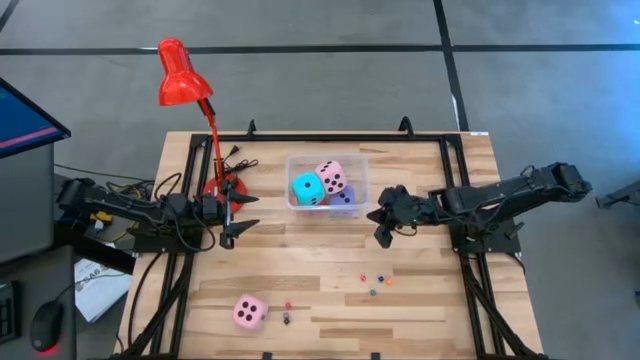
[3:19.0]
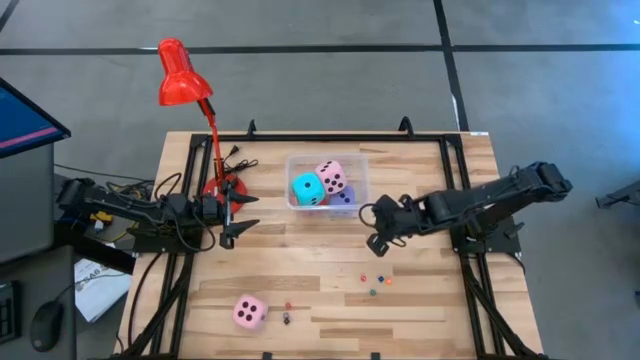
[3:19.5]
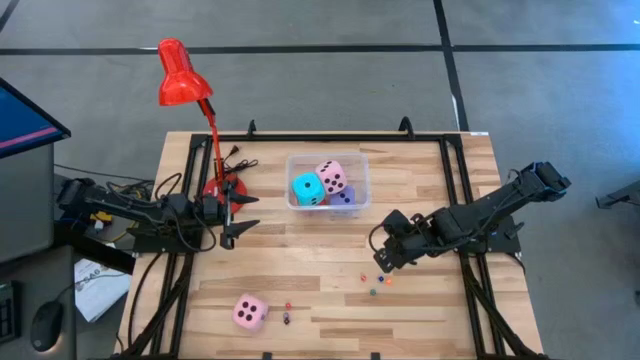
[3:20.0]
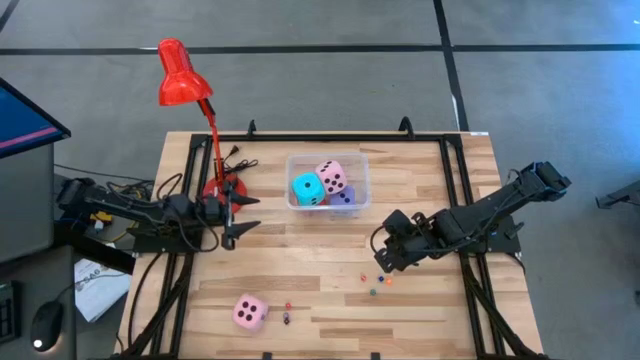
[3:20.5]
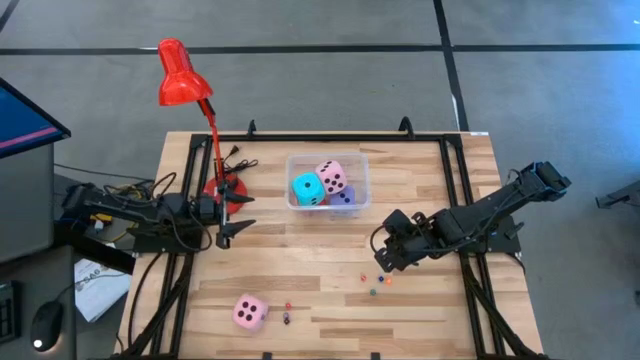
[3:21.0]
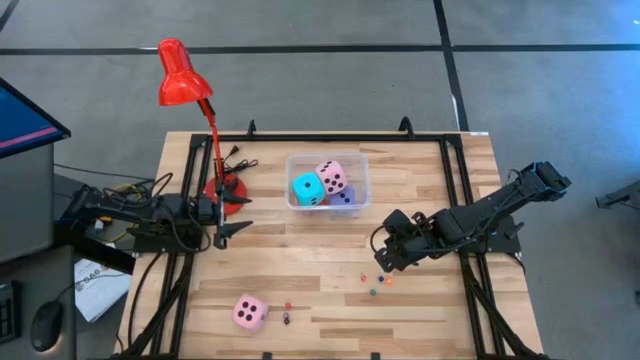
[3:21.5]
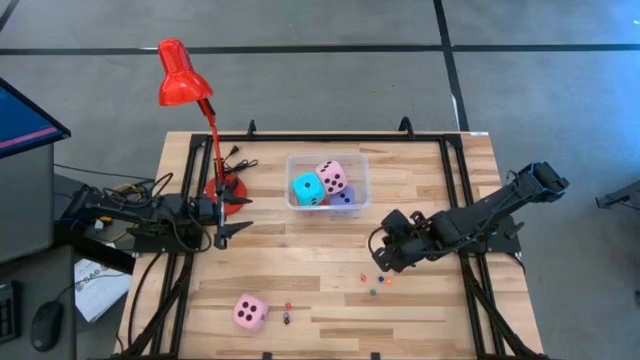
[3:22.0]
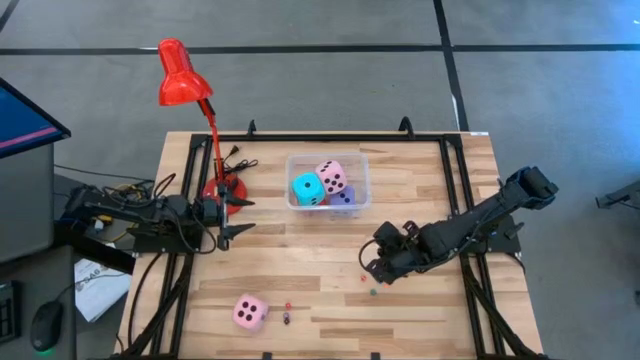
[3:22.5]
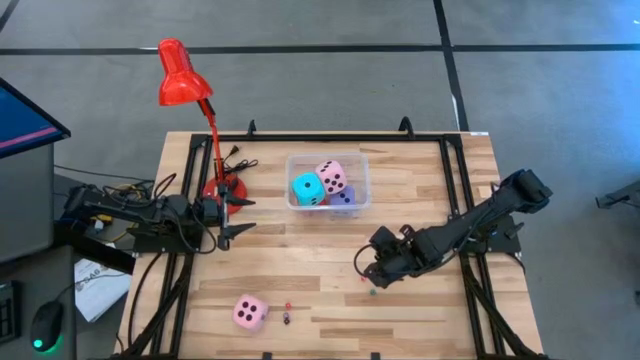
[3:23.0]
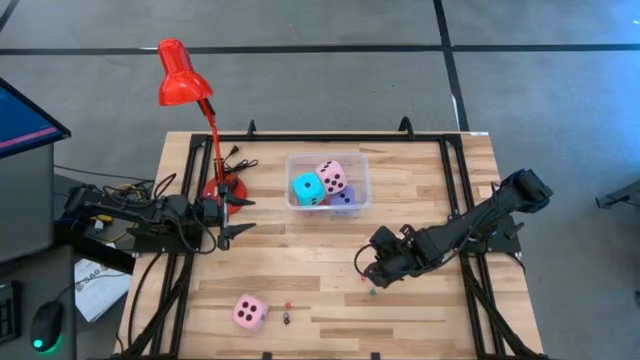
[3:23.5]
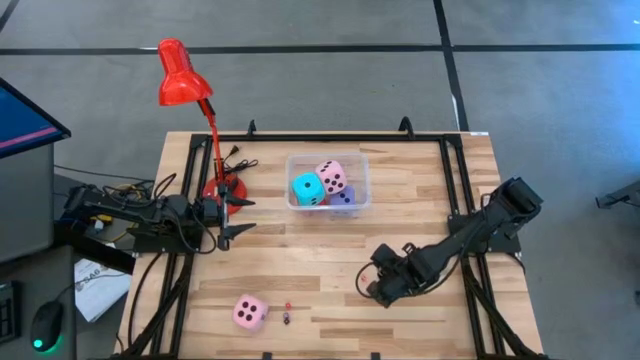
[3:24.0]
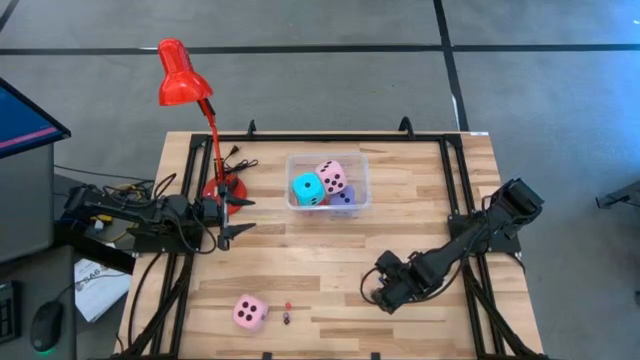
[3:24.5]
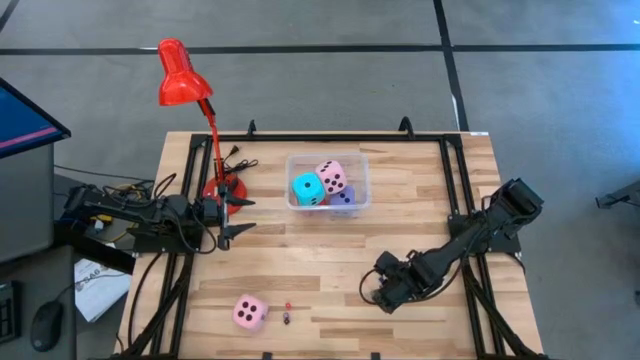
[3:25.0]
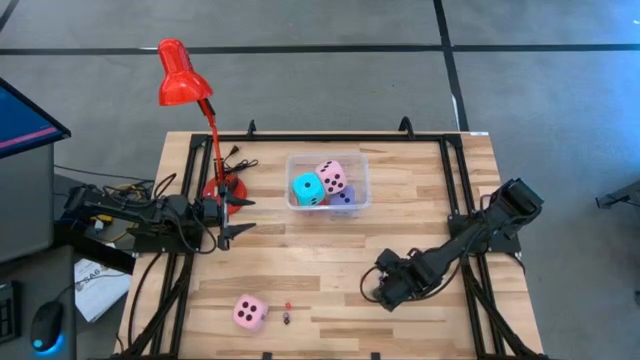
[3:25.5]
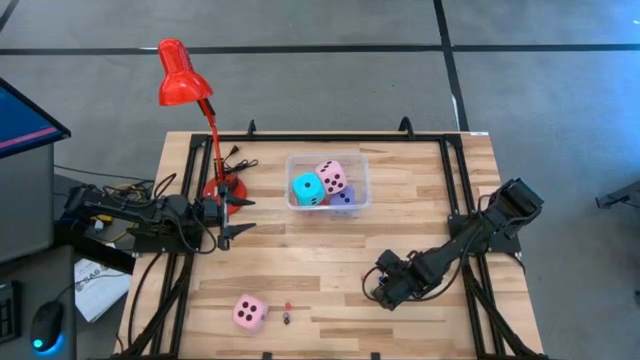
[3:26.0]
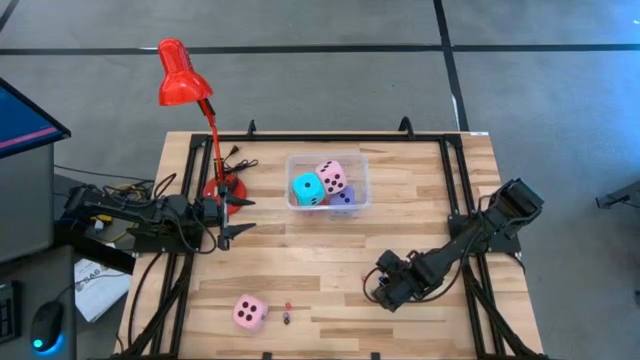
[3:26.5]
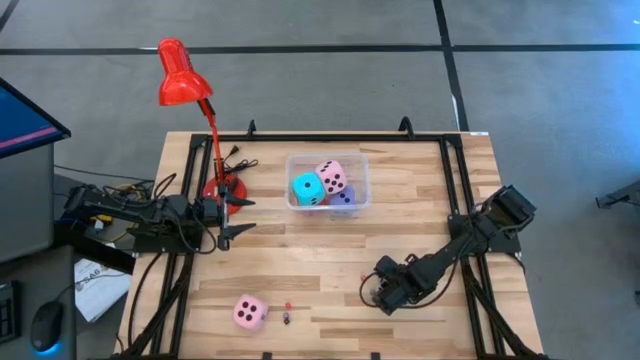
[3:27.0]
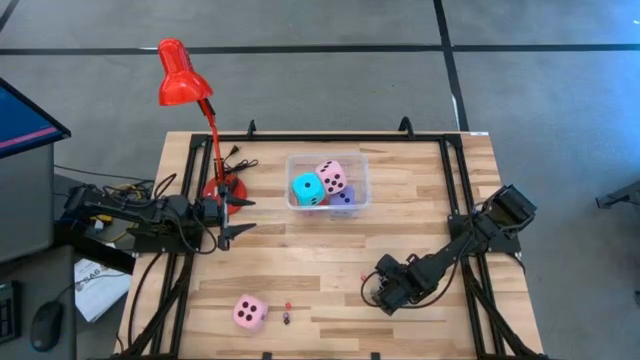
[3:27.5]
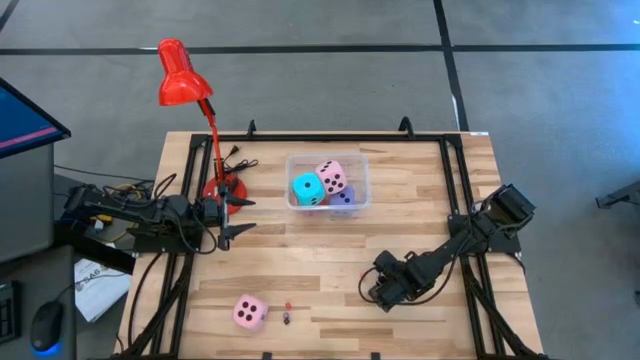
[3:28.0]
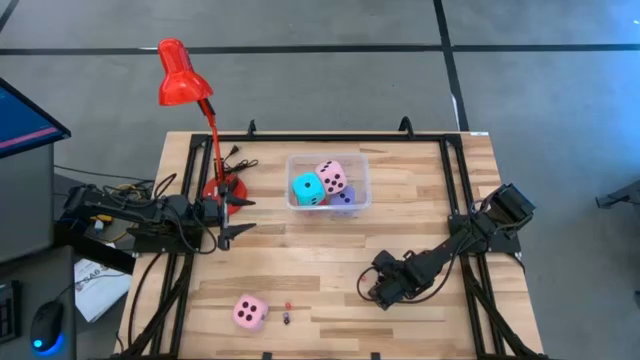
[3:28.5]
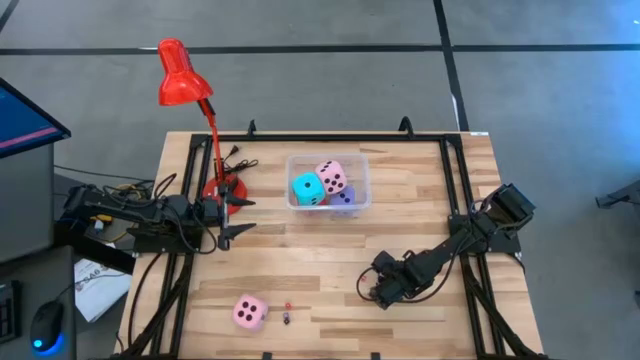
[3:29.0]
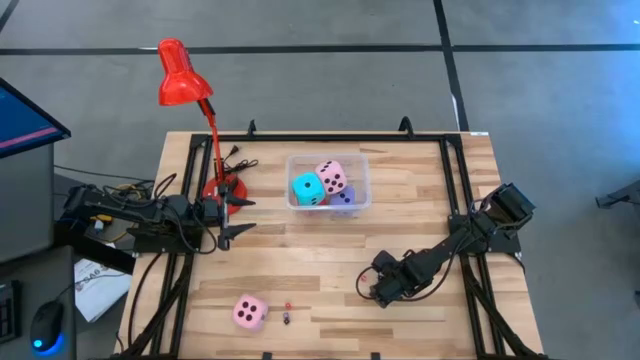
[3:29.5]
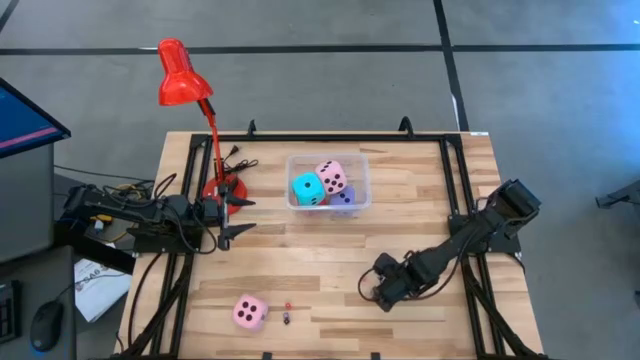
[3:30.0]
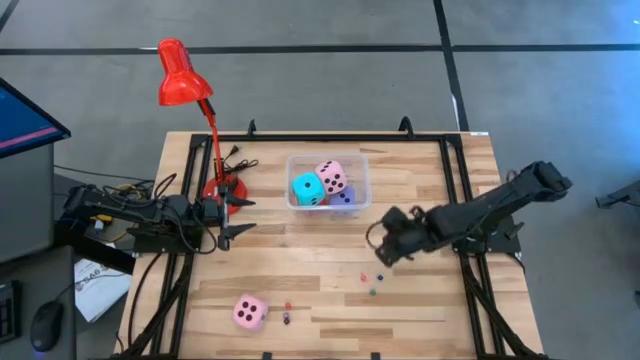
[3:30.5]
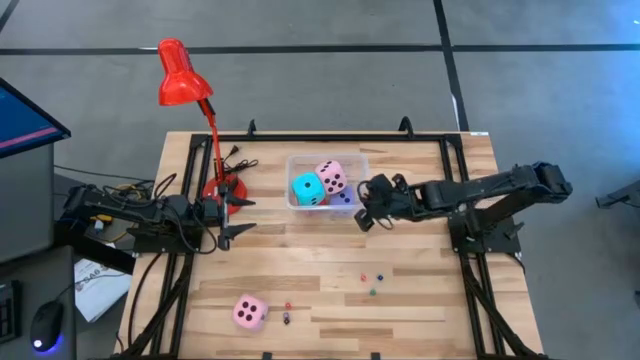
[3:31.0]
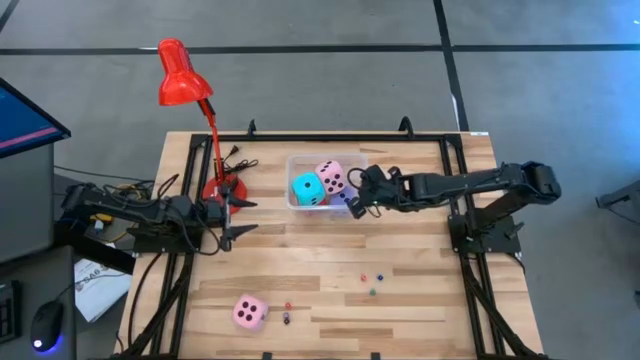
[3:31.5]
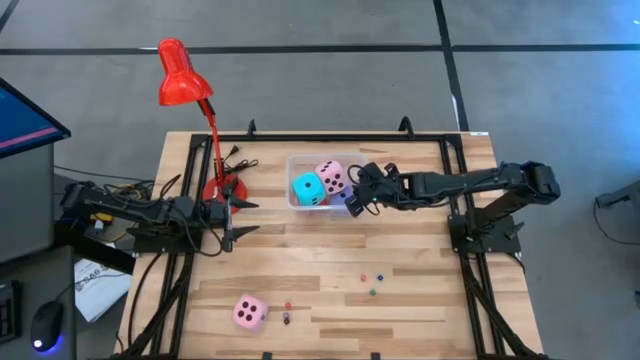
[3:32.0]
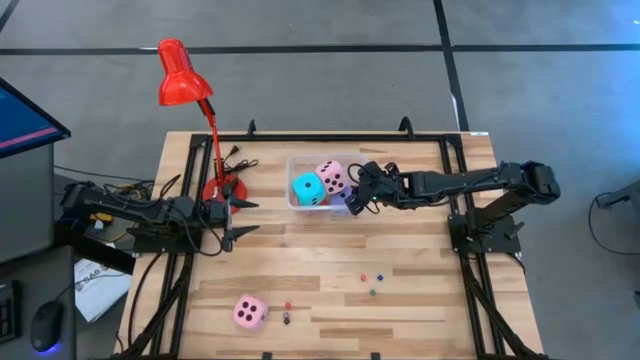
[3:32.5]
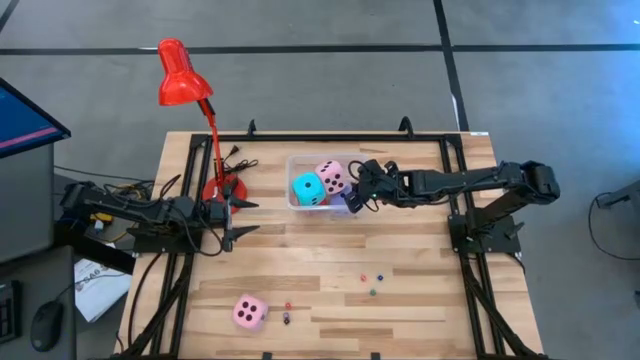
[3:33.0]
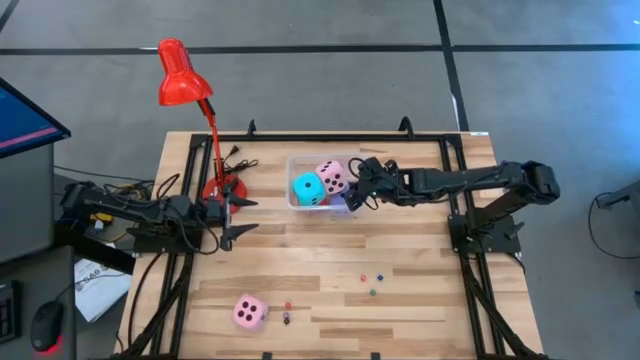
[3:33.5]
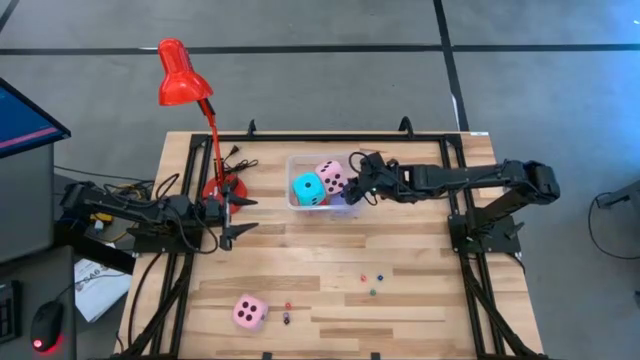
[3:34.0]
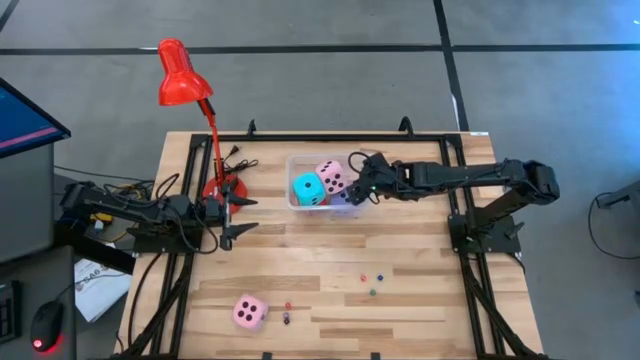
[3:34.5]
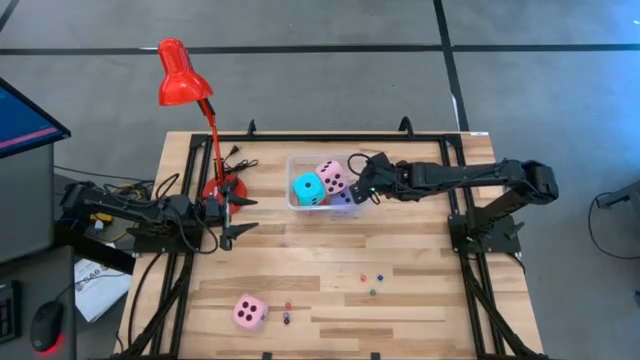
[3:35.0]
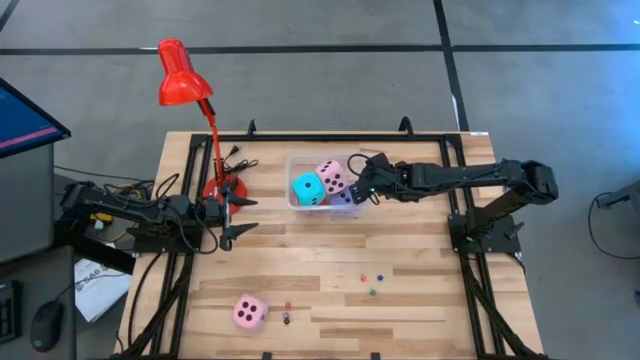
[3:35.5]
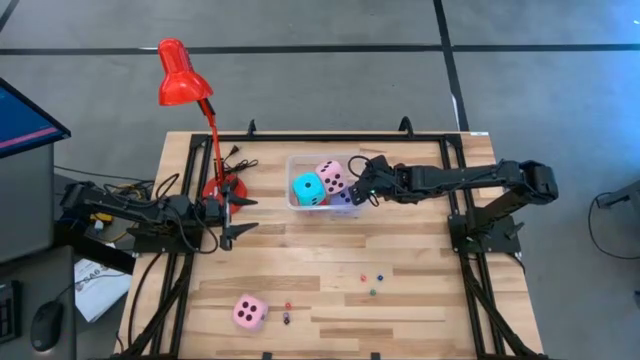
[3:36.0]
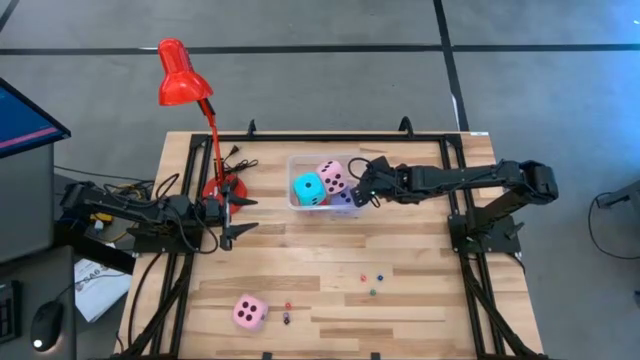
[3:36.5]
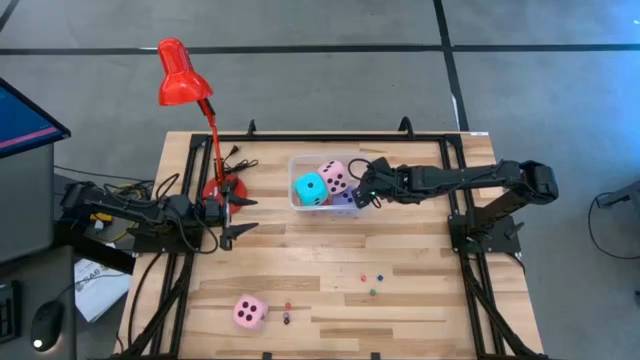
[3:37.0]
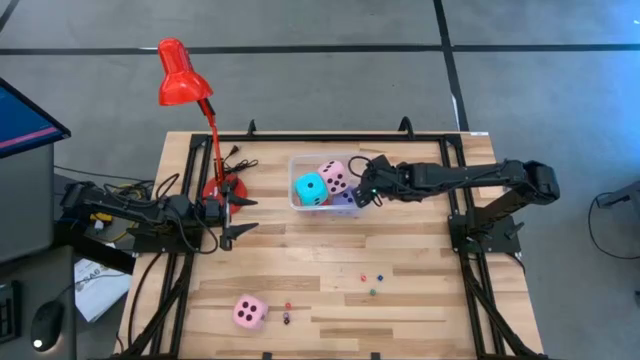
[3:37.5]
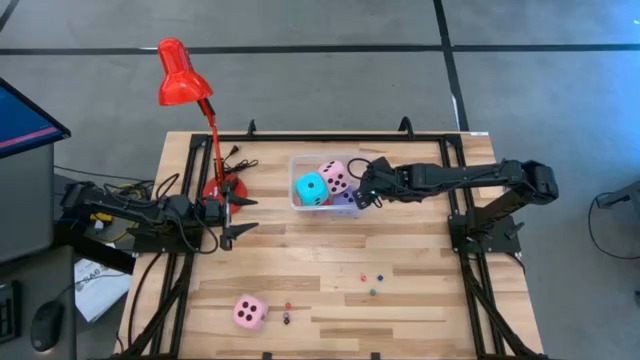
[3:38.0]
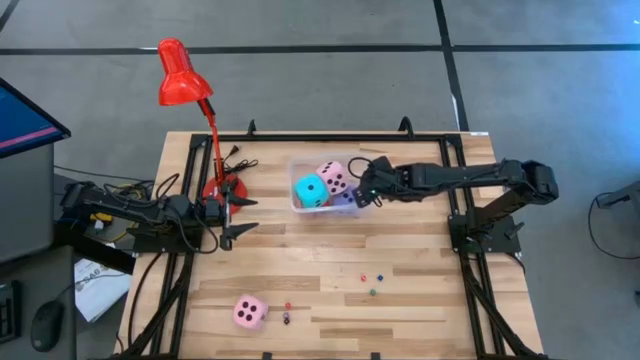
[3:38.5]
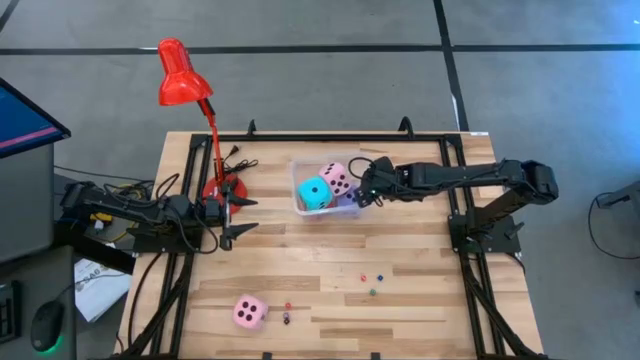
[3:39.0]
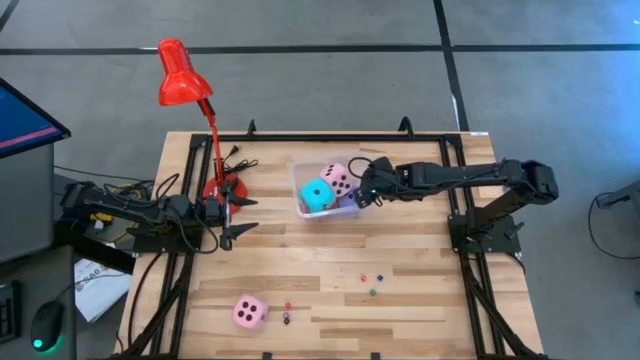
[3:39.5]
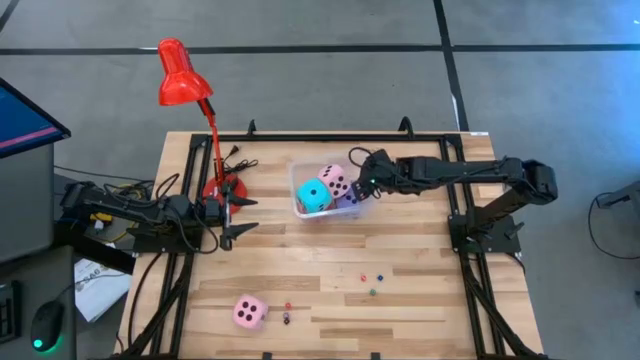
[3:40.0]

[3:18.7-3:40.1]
Task: Pick & Place Dice
Put the small orange die into the transparent bin
